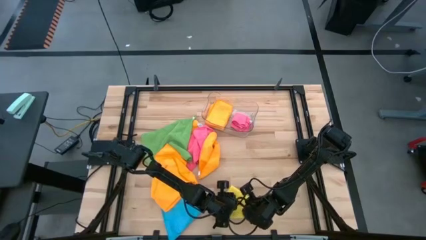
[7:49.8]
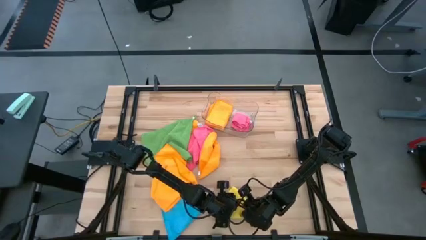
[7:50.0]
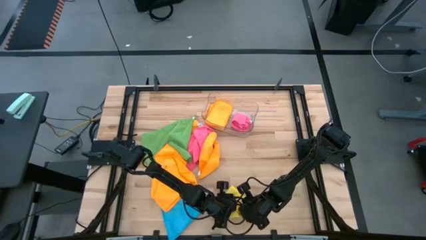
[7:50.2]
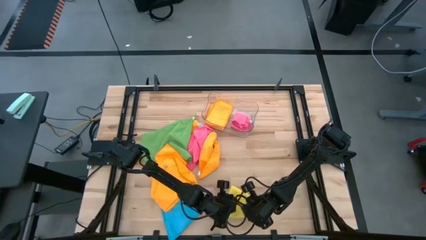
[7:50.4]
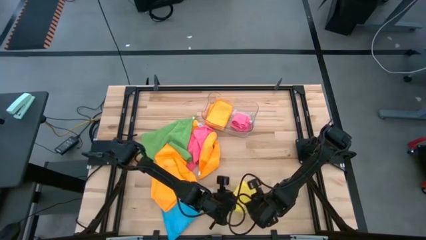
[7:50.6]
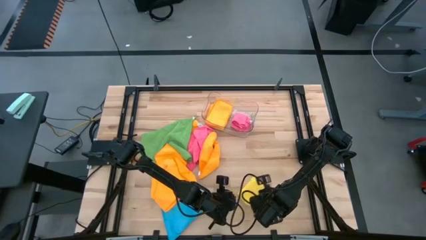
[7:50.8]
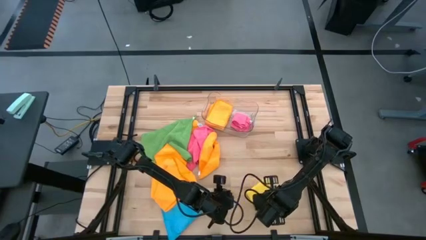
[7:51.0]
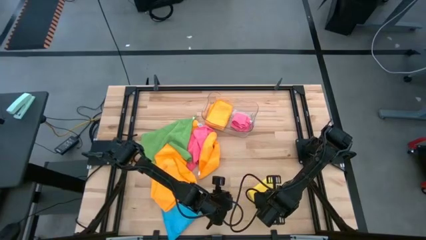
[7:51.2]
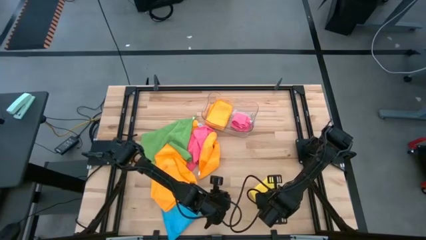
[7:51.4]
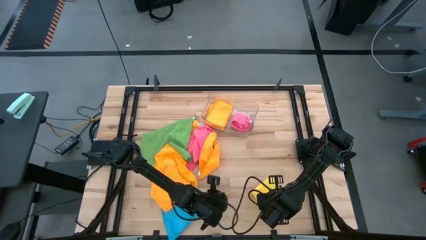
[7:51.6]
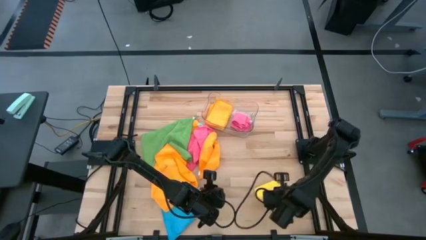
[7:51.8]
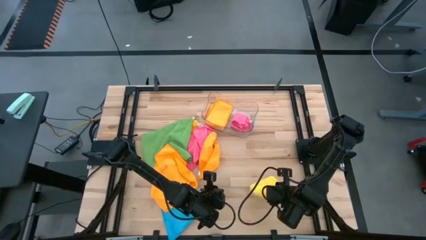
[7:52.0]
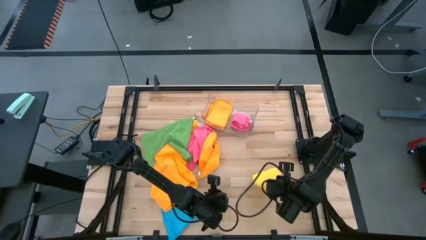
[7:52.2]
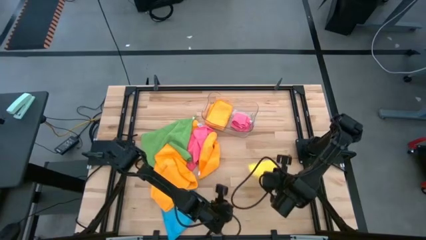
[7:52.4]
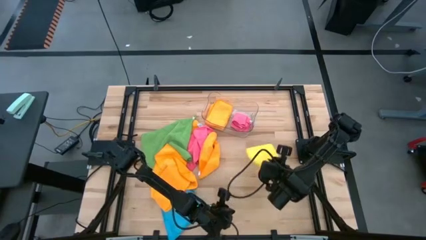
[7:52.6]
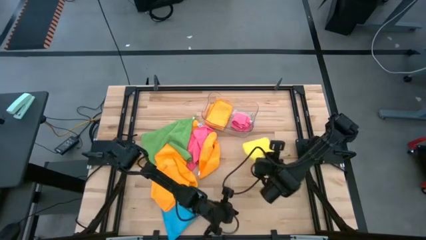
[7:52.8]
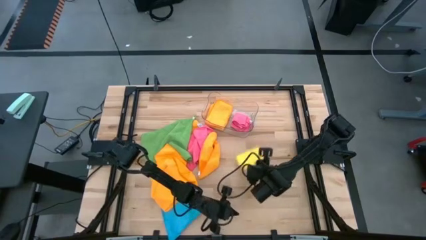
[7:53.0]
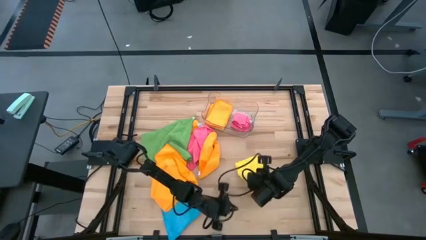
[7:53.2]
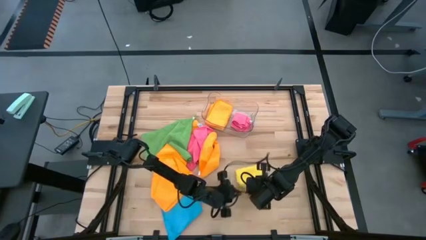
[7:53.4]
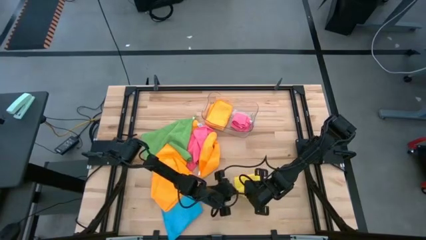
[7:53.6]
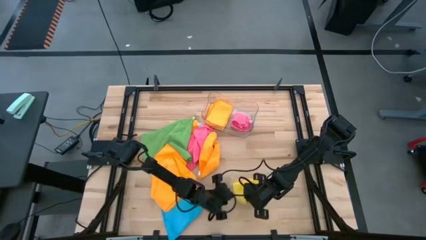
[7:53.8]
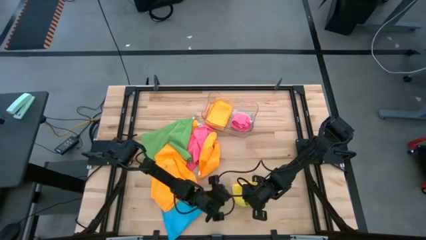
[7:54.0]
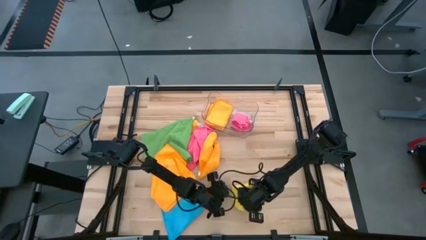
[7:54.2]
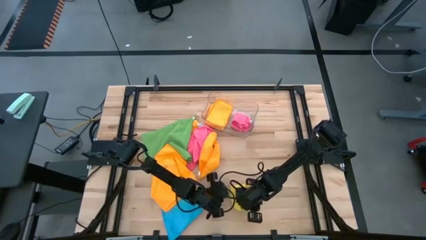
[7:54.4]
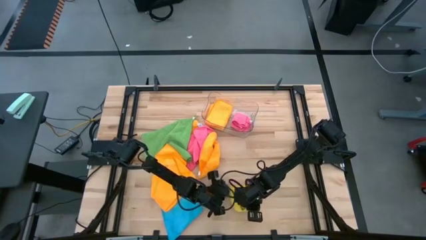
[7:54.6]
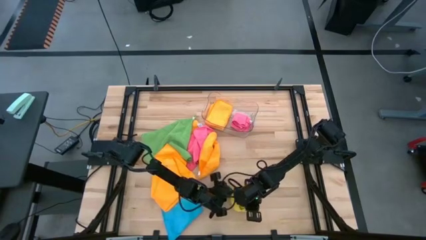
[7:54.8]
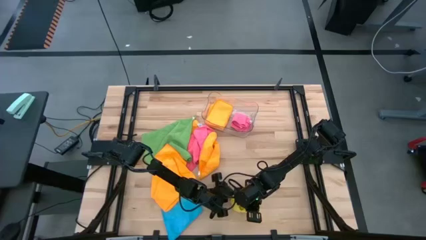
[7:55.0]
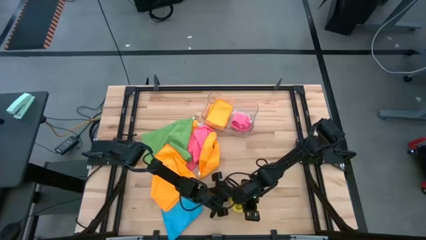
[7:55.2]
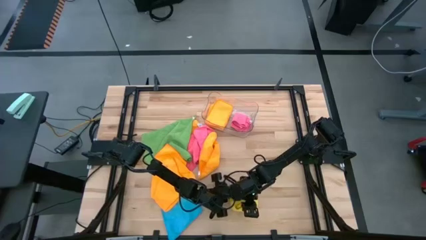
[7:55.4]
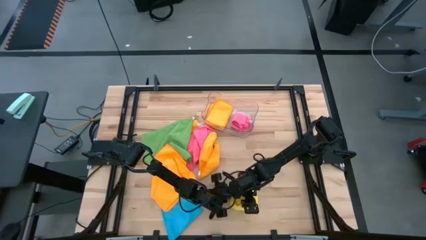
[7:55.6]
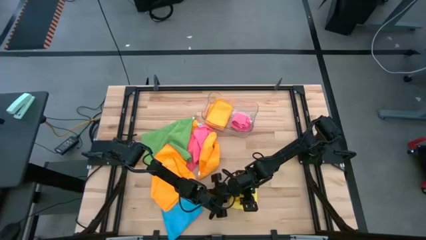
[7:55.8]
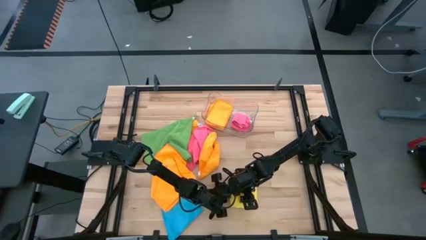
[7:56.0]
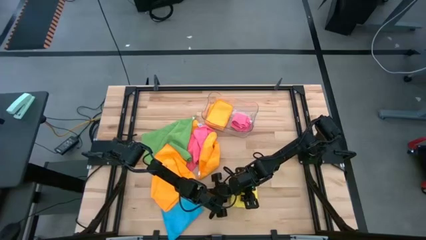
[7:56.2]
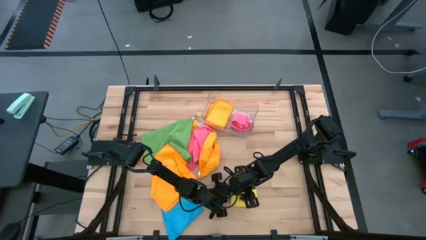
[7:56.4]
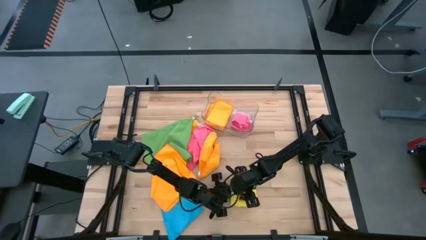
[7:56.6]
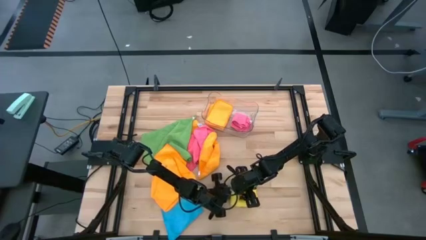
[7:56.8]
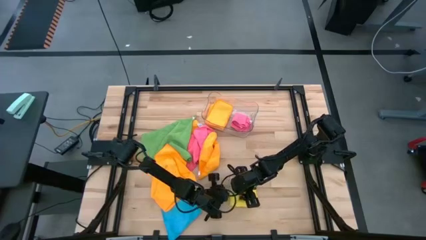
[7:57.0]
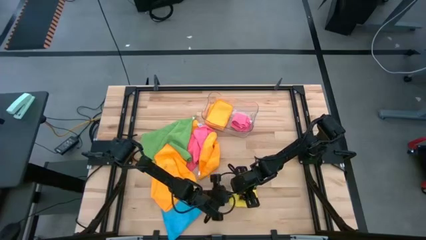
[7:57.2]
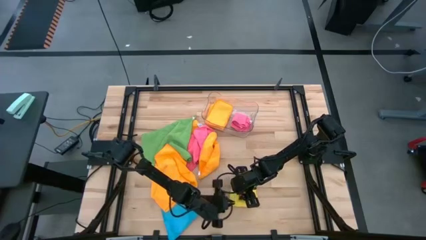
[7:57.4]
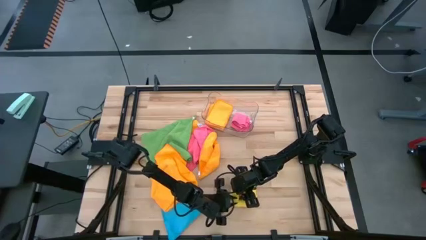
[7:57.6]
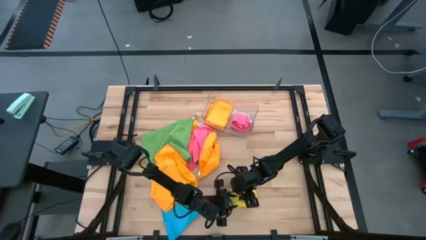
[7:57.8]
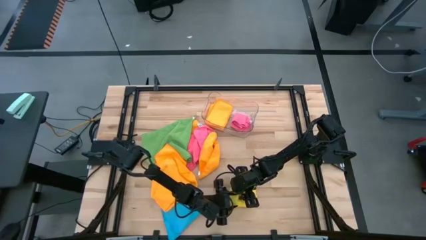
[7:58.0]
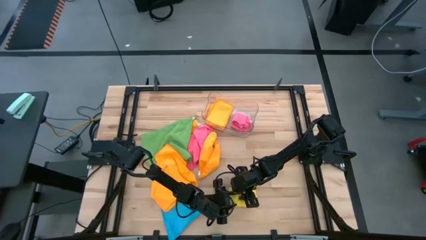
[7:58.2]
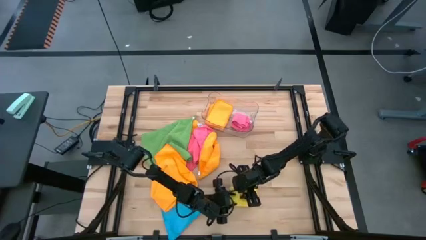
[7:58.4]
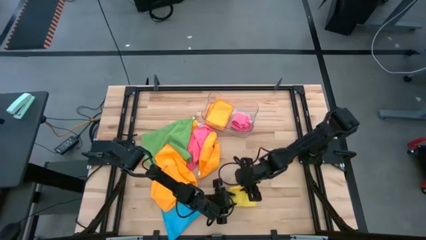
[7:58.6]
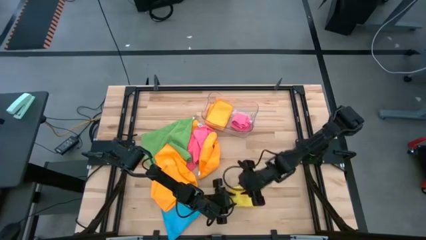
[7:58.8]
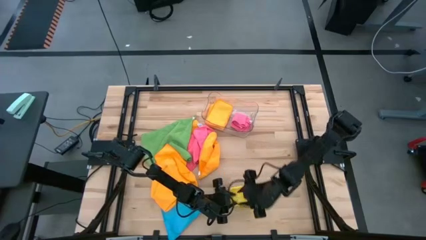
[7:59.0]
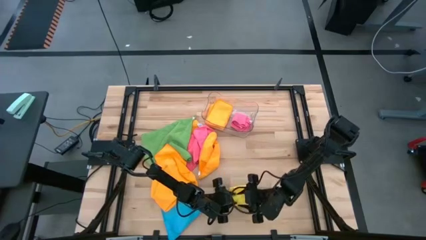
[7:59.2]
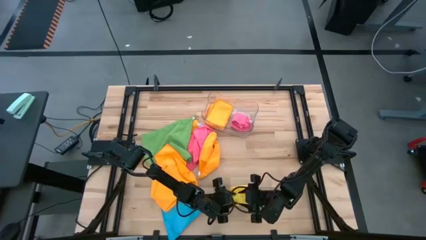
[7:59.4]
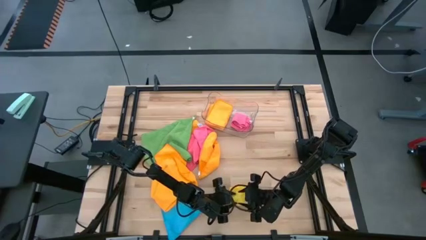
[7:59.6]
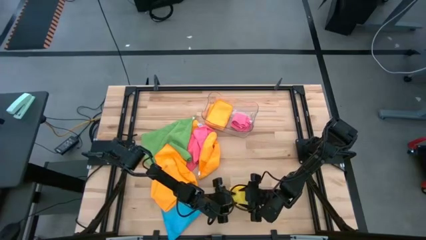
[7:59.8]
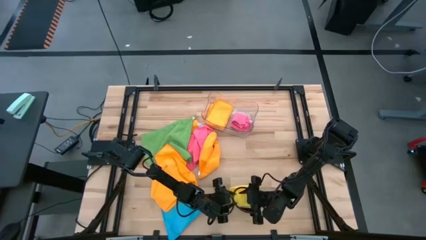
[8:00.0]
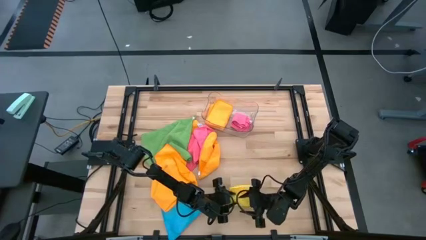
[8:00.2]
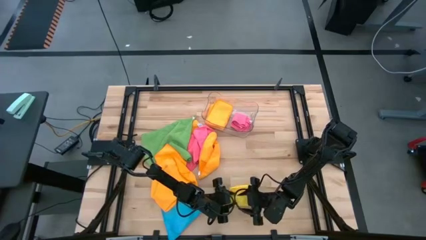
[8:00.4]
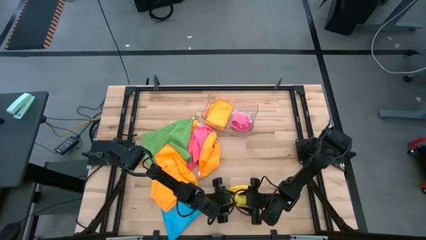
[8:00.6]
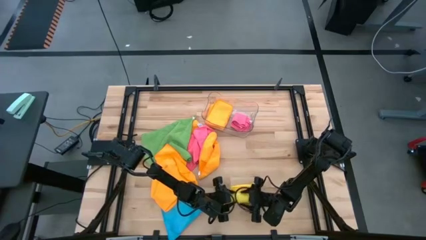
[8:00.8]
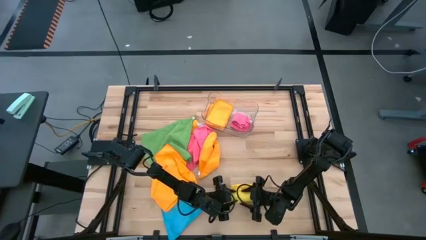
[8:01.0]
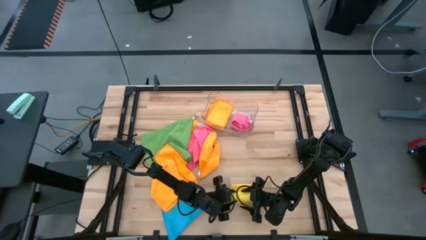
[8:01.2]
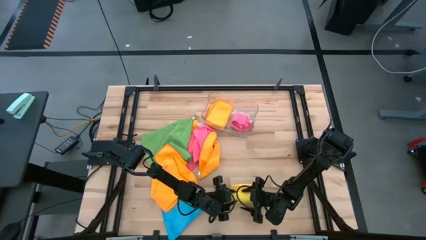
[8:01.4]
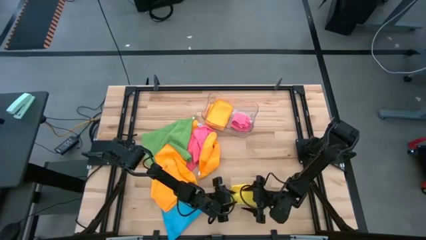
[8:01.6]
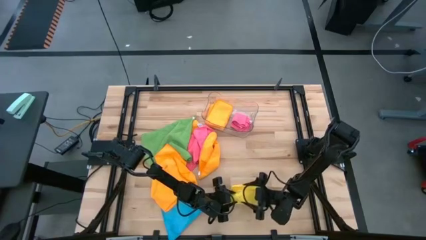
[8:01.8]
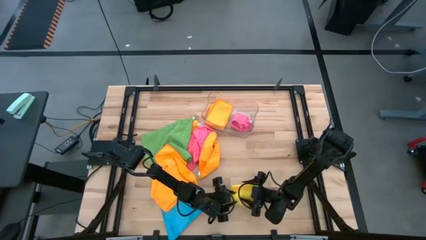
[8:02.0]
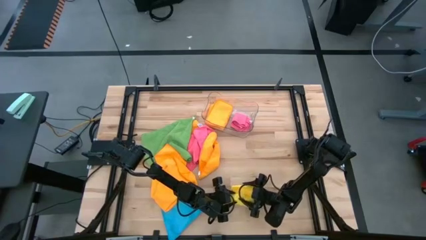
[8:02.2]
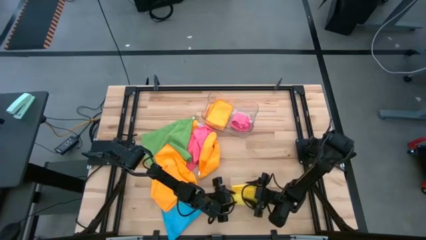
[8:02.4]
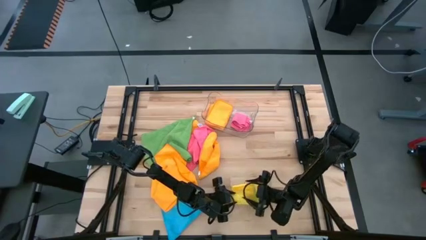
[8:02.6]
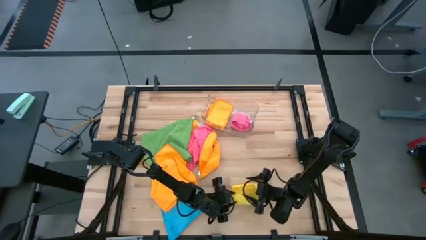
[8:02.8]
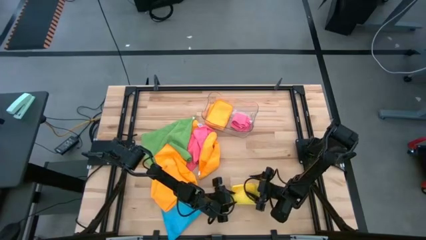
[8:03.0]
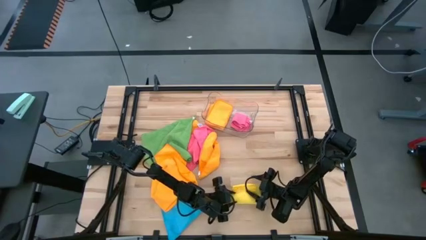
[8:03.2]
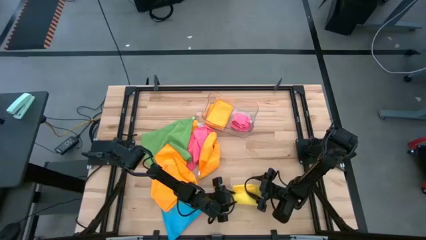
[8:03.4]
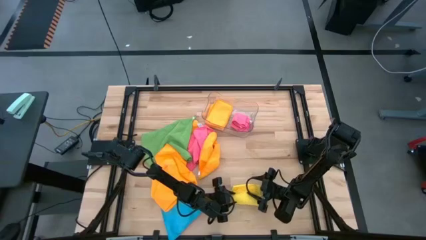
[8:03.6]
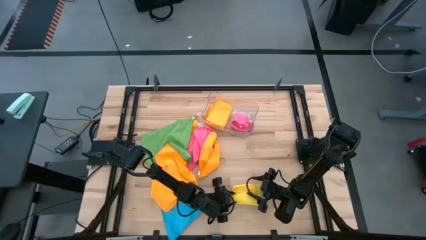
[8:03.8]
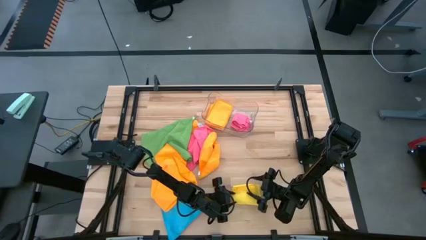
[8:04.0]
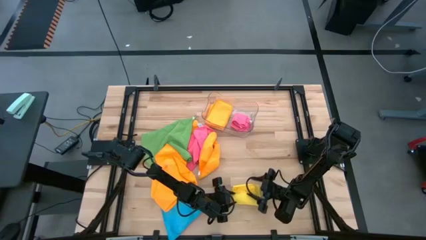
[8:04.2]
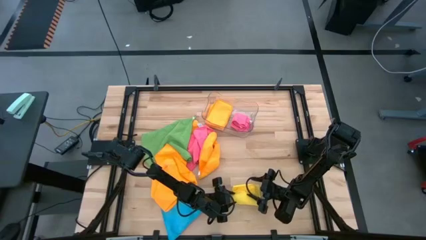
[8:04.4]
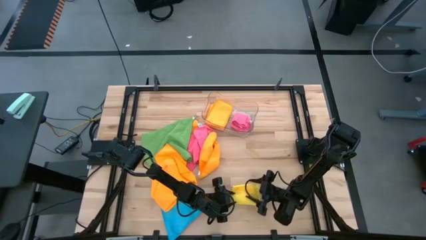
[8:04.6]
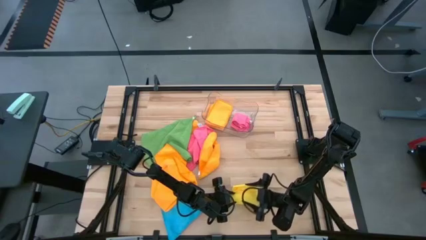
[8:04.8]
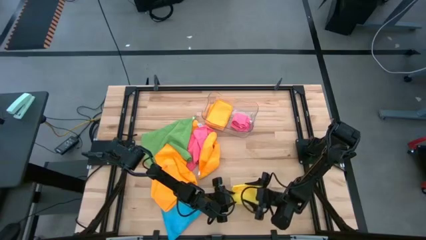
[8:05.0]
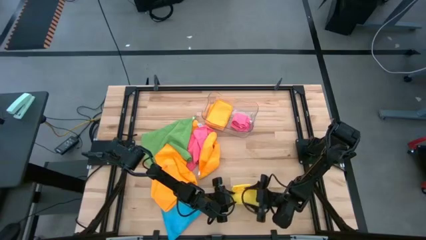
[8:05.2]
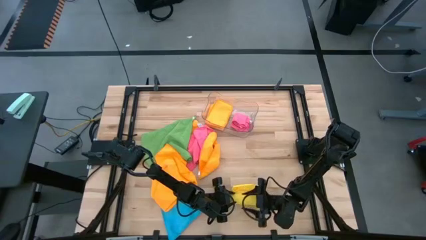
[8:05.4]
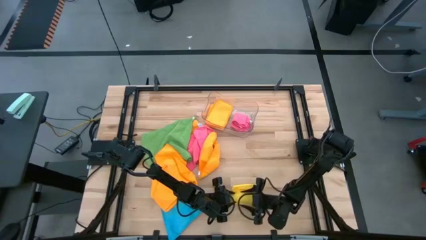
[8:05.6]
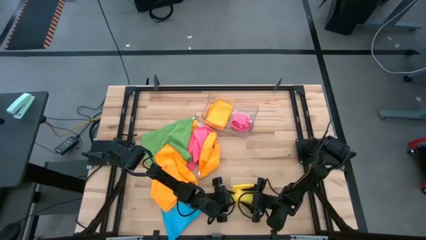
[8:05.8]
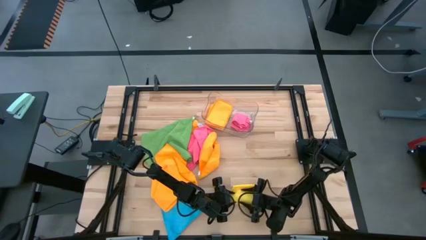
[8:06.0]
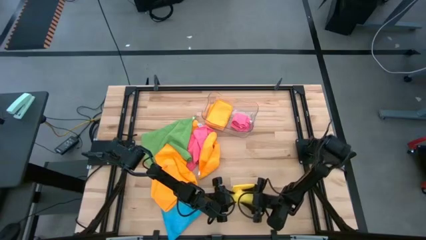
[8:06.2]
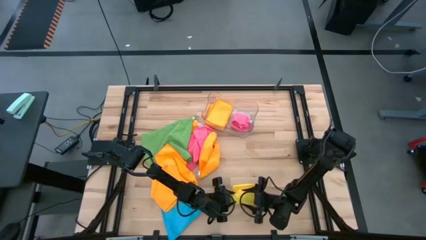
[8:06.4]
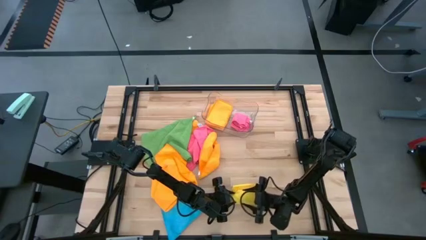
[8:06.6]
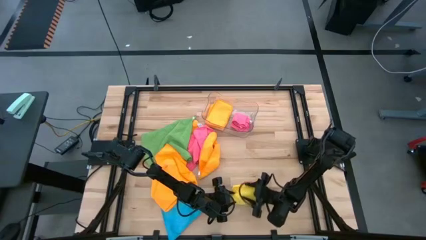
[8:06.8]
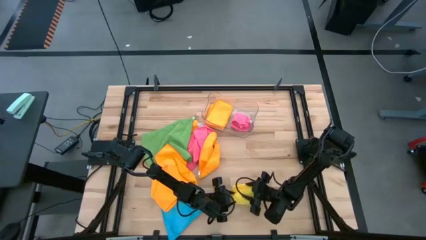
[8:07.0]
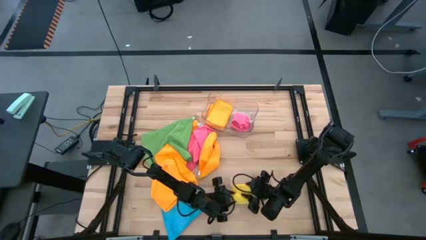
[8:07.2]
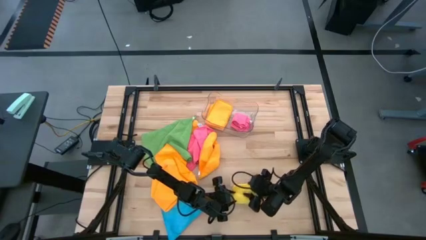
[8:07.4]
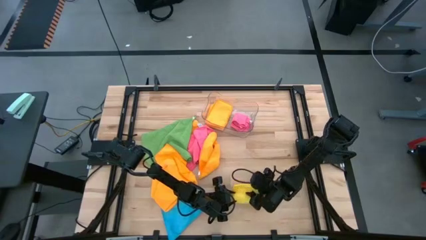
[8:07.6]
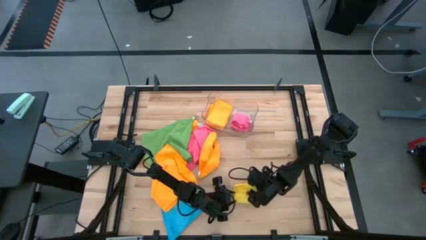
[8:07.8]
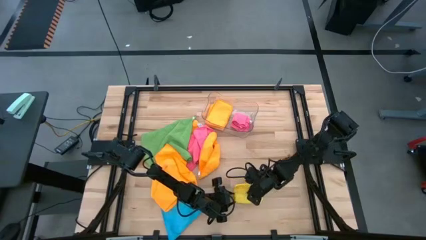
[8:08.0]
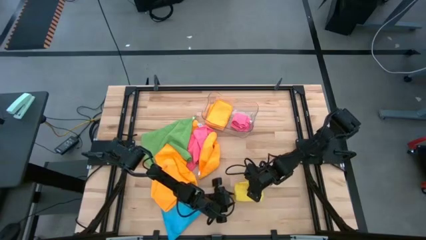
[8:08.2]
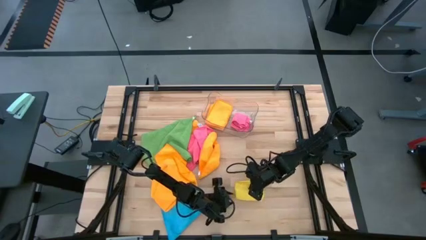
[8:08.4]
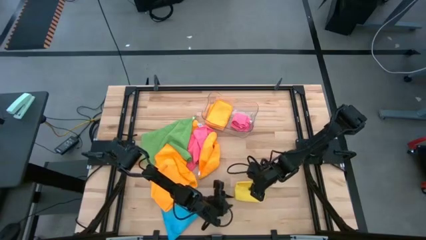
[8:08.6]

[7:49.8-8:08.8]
Task: Fold microfiber towels
Fold the yellow microfiber cloth
